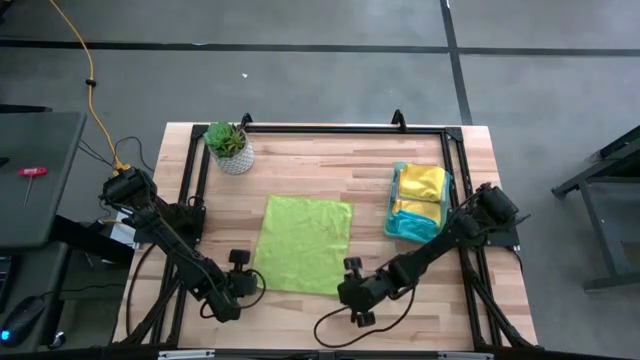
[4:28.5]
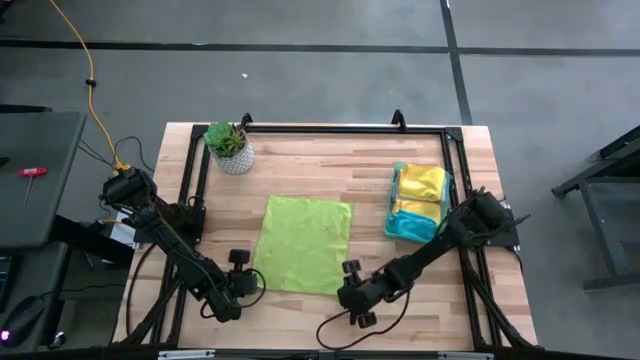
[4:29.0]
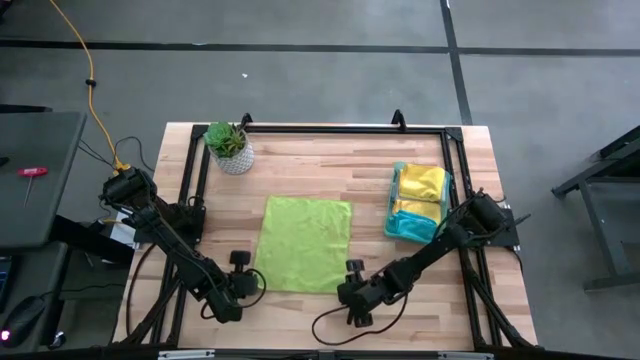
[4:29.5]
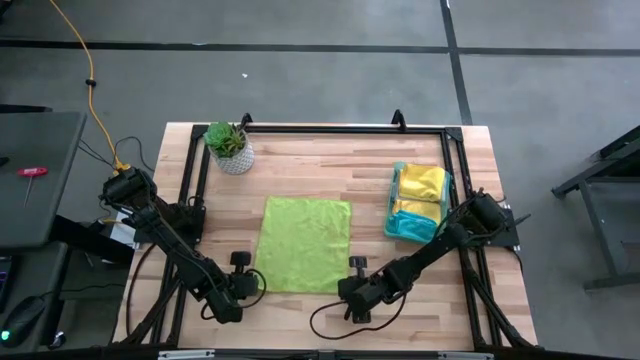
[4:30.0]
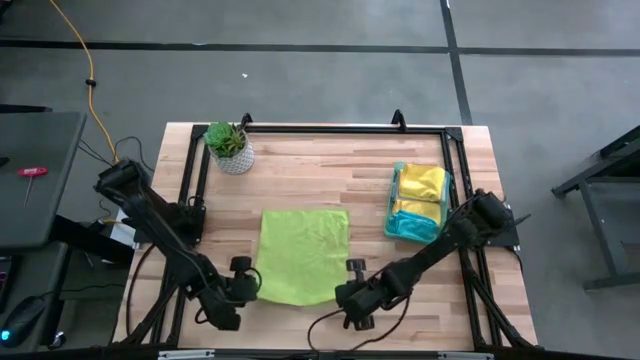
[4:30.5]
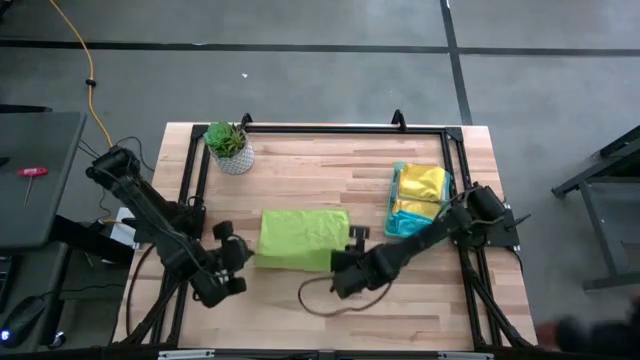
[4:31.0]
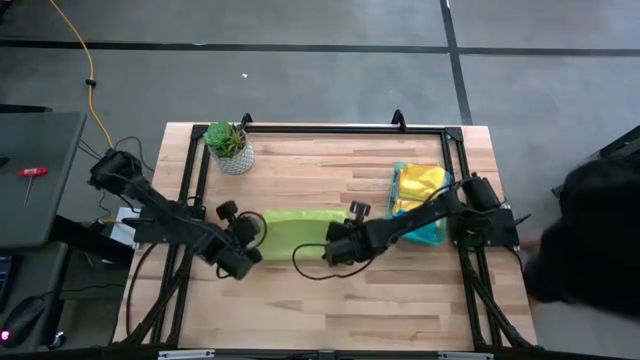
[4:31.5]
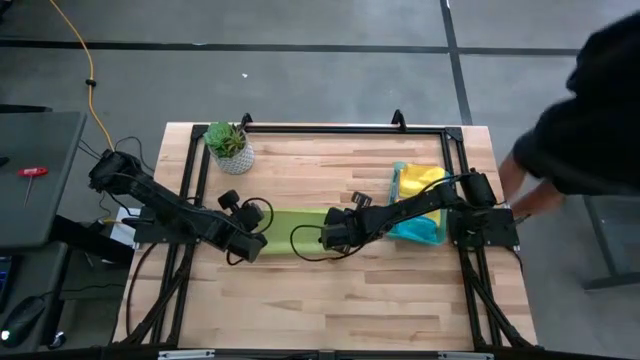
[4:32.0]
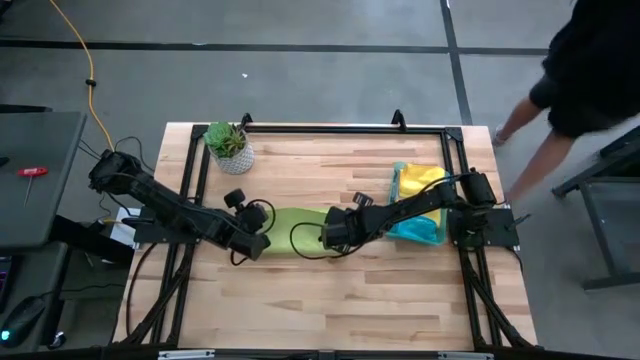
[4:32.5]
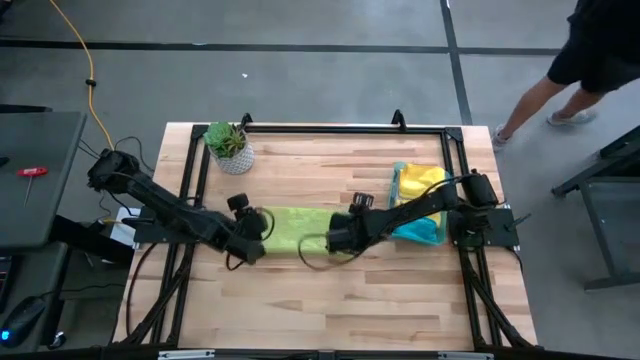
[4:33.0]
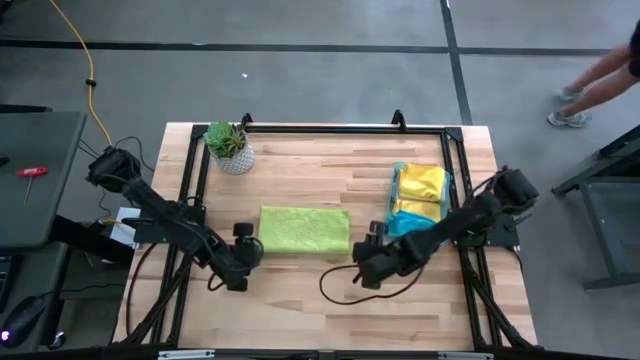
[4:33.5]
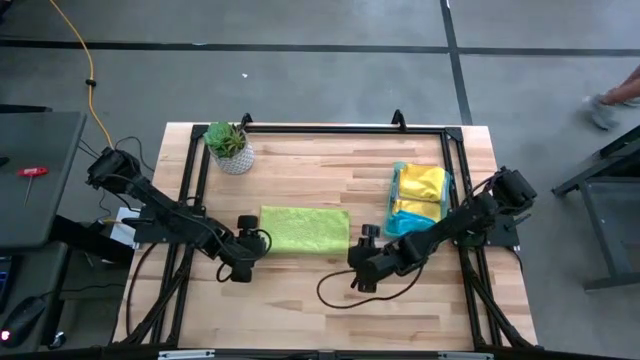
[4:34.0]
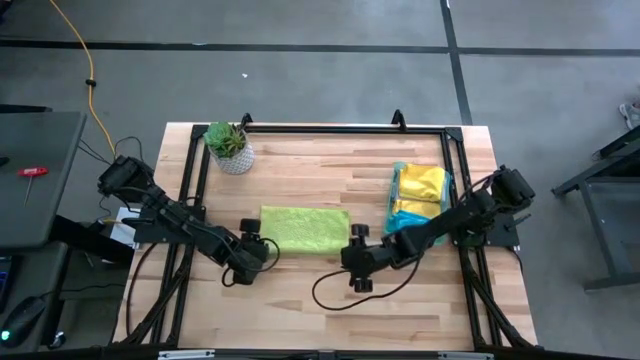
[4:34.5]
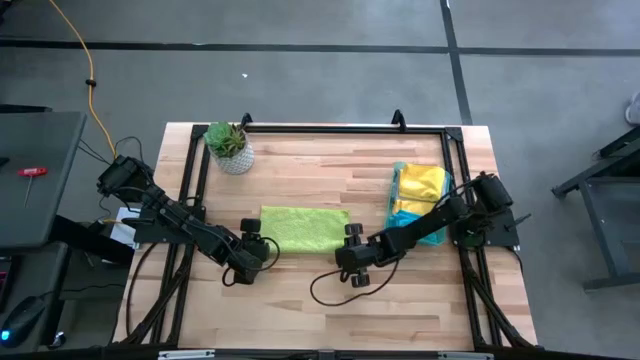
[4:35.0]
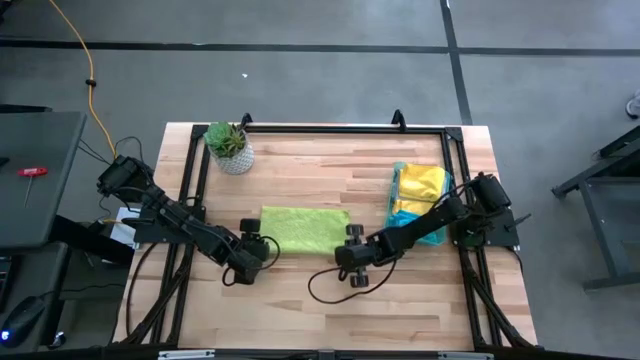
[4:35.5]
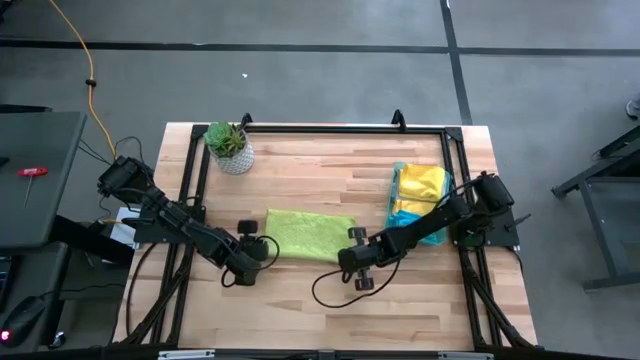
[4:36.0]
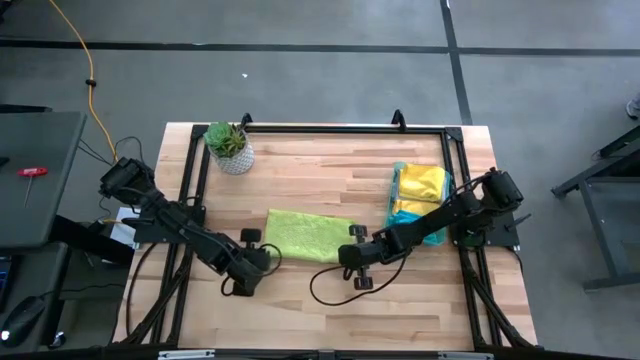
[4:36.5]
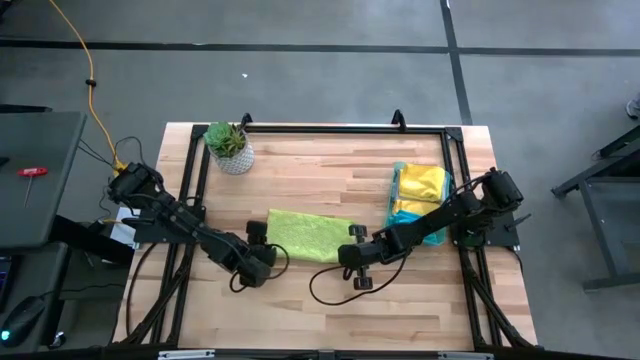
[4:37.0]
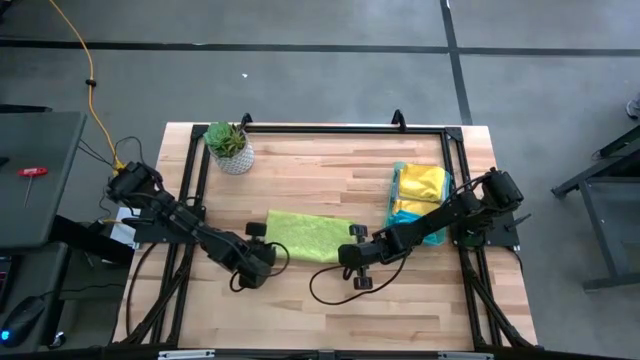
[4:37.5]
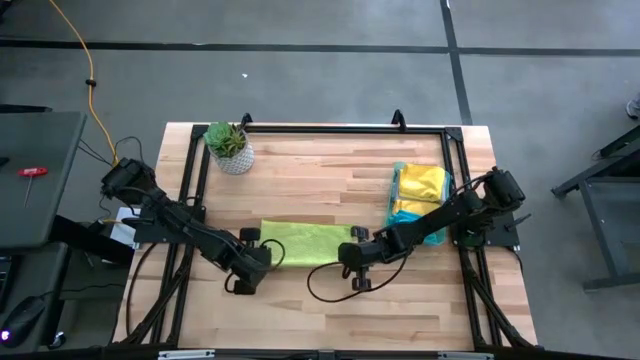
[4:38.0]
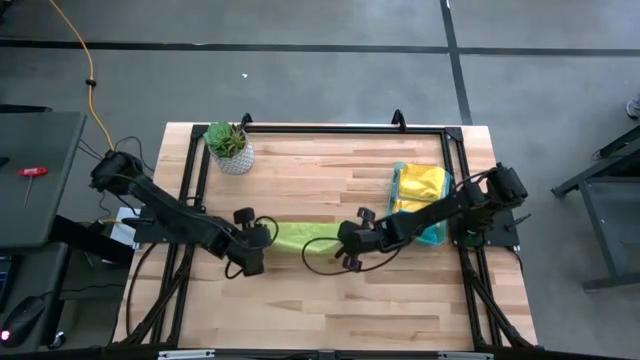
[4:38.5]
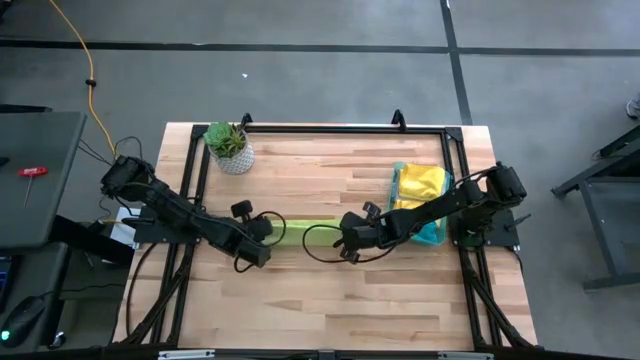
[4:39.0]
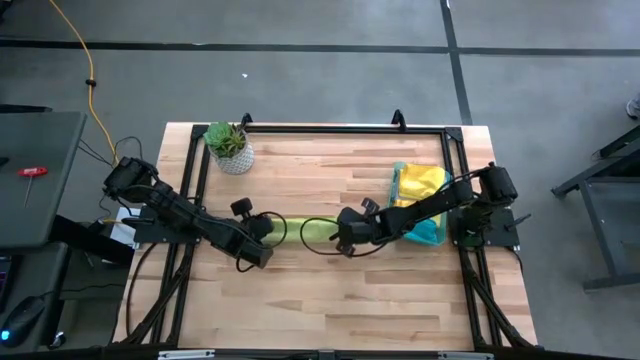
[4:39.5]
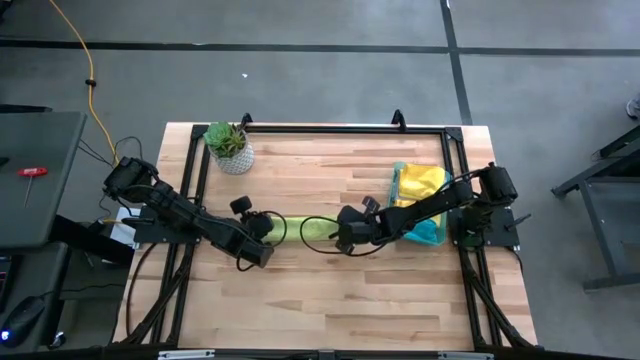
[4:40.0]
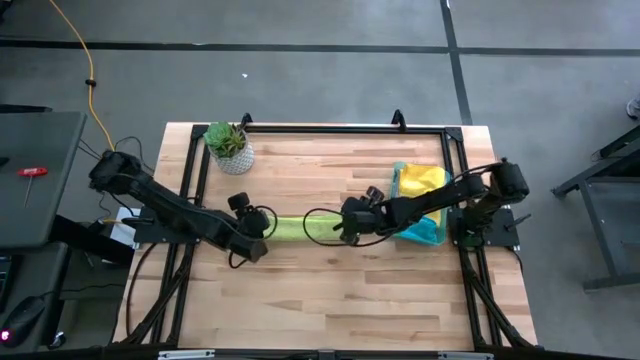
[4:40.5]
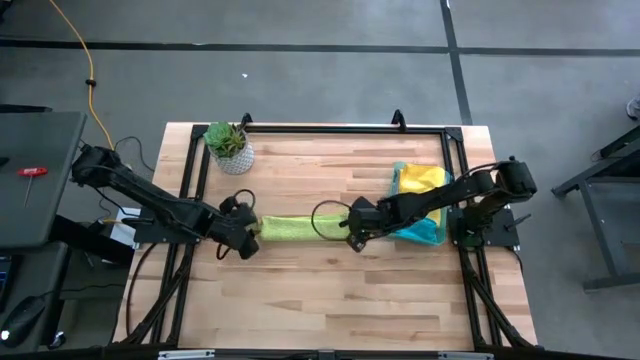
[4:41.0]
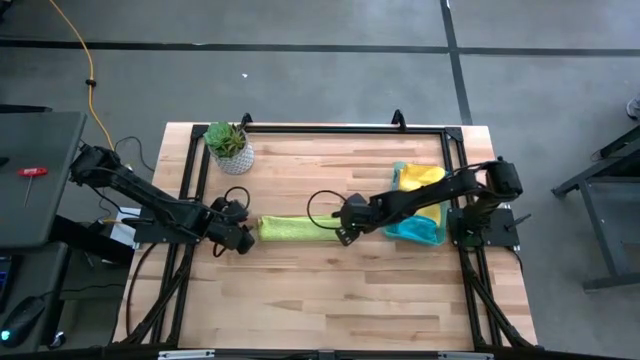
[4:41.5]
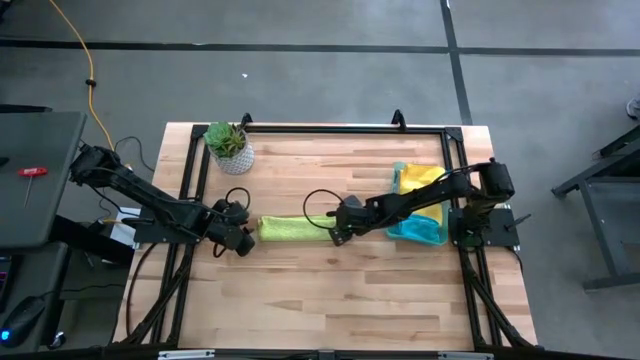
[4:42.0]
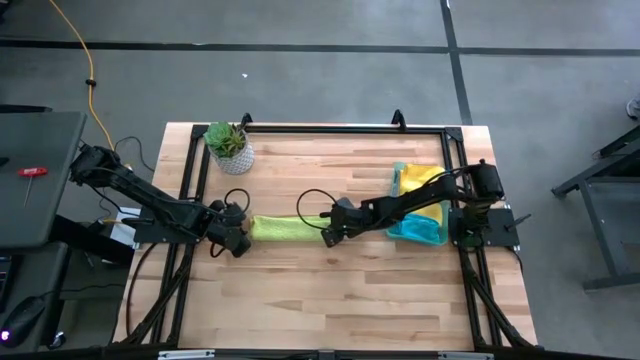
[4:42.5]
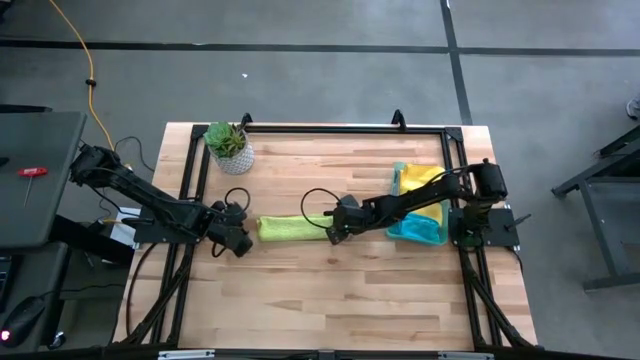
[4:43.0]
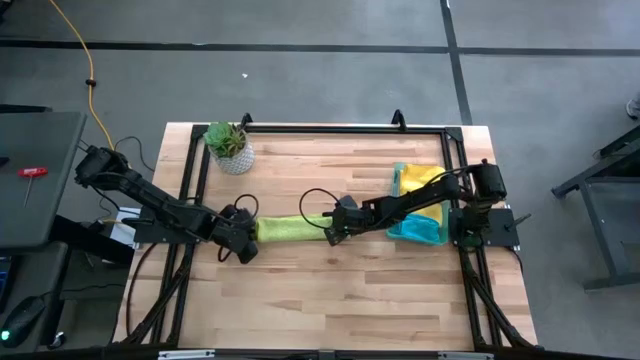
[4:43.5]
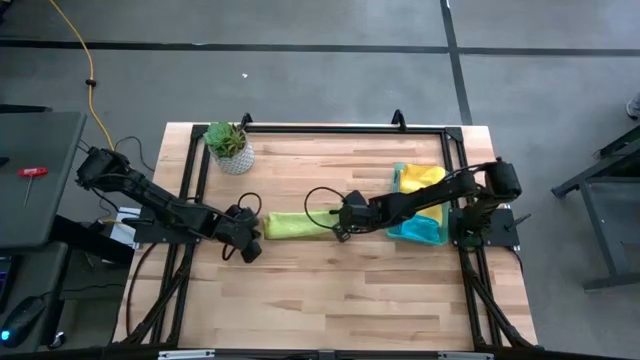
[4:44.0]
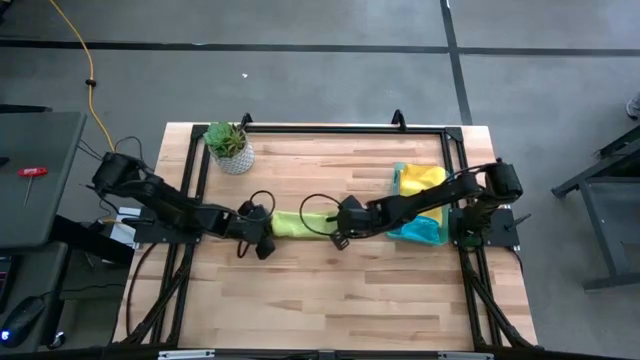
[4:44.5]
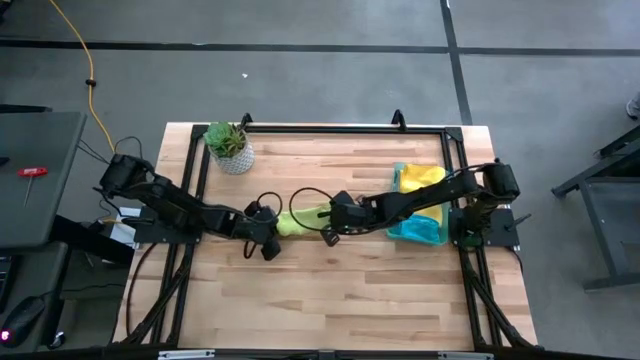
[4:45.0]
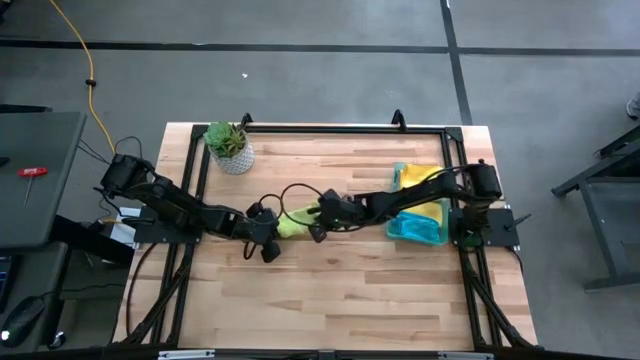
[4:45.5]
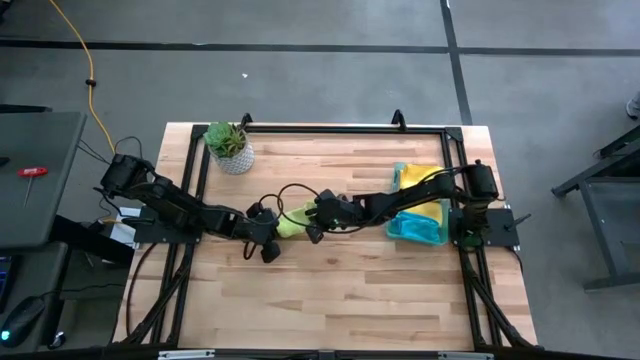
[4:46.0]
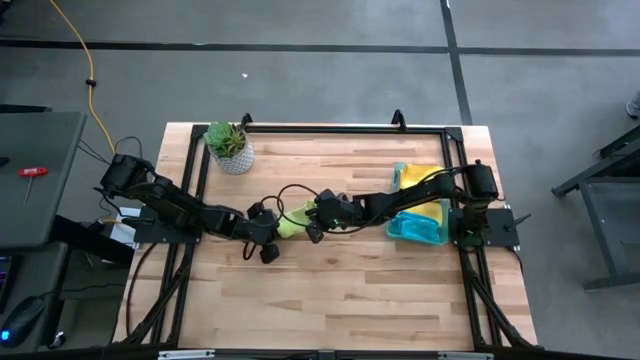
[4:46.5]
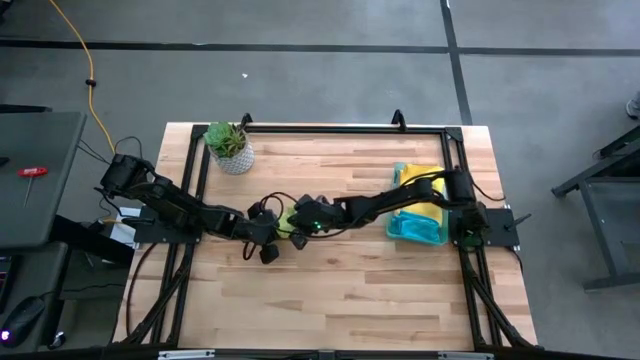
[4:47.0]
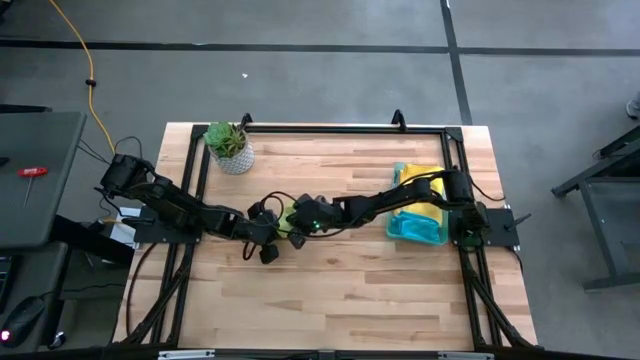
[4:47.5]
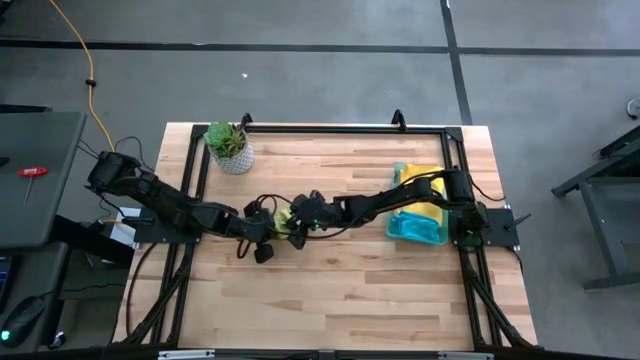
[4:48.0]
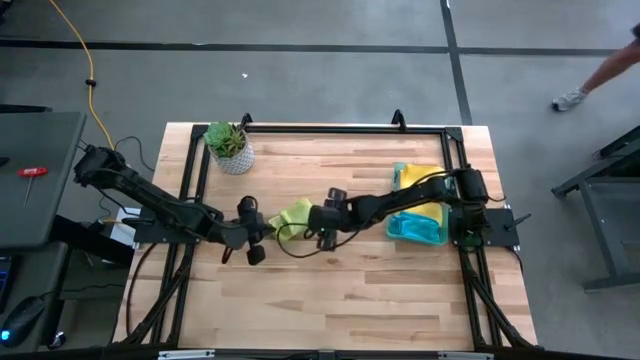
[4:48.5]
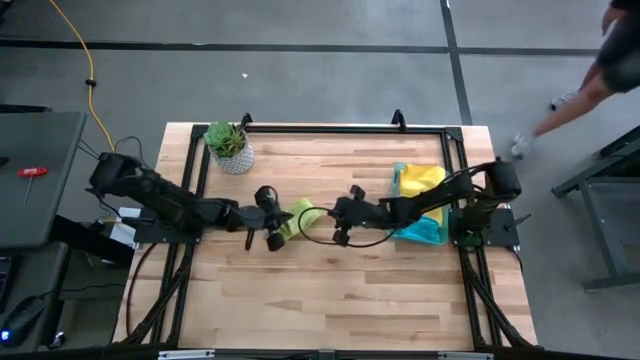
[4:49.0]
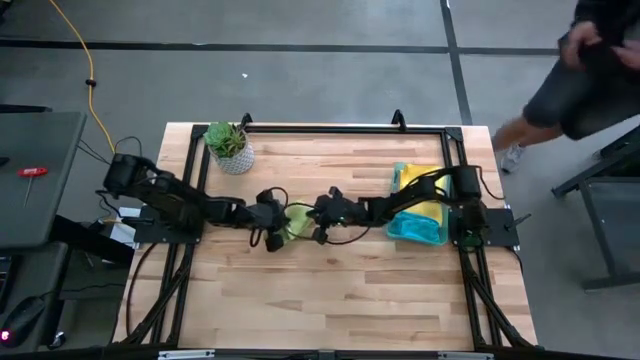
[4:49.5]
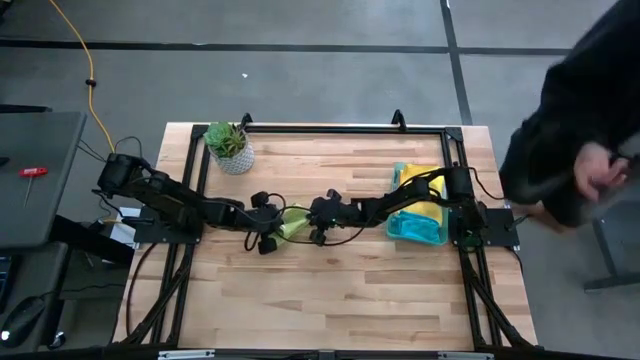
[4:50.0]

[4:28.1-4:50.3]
Task: Fold microfiber towels
Fold the green microfiber cloth
